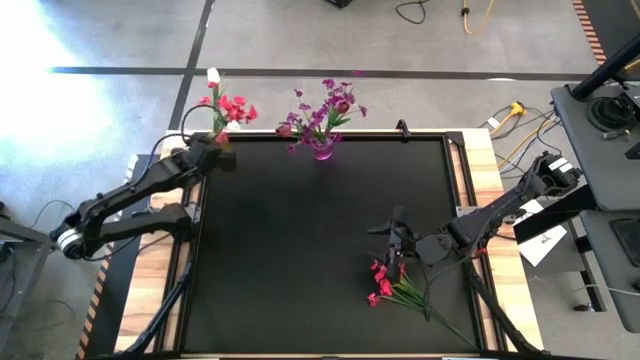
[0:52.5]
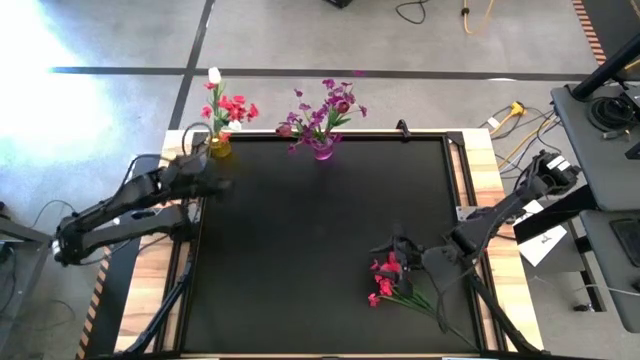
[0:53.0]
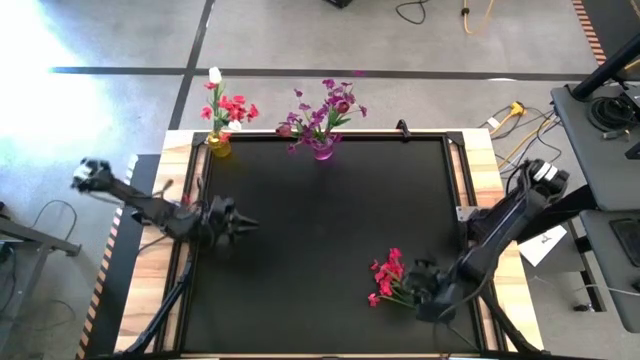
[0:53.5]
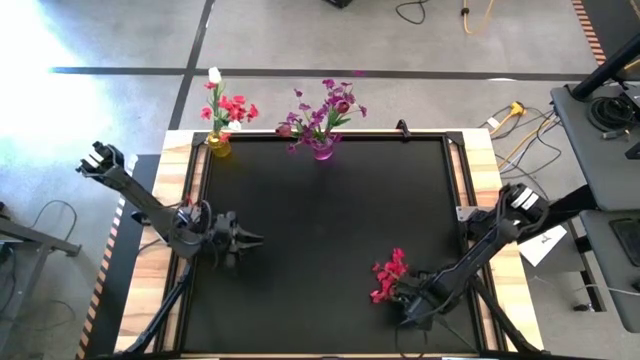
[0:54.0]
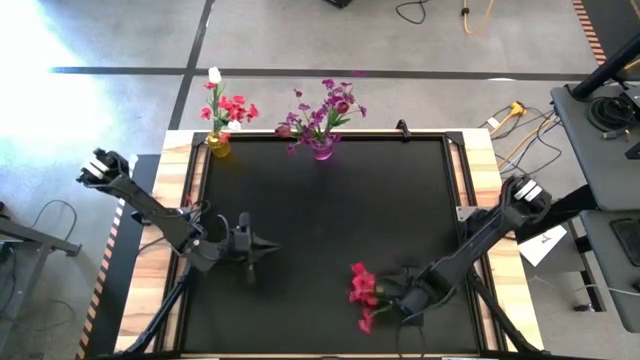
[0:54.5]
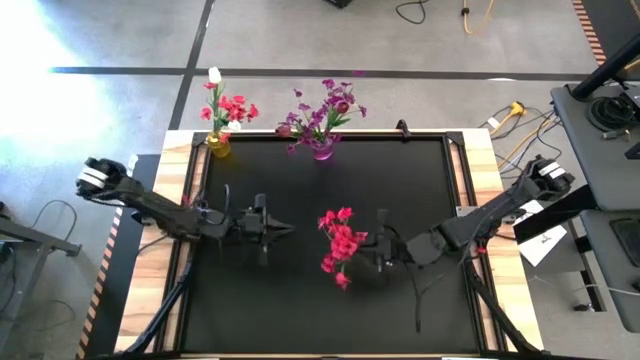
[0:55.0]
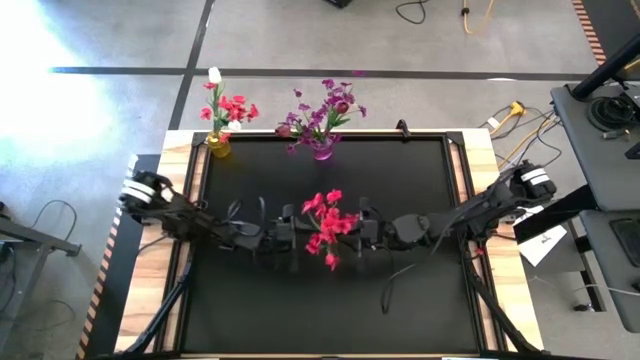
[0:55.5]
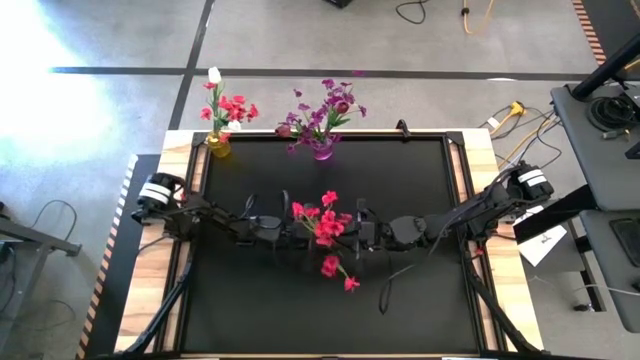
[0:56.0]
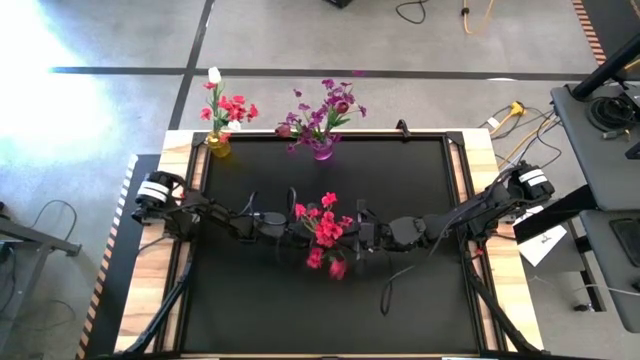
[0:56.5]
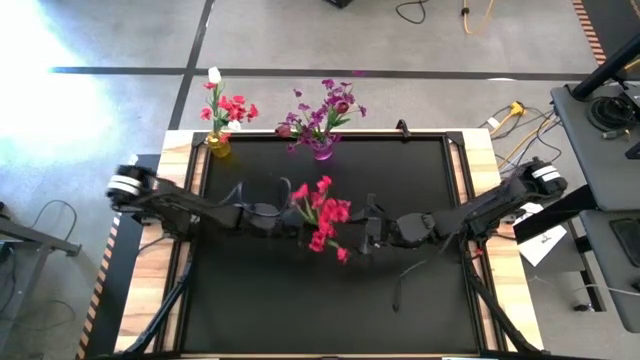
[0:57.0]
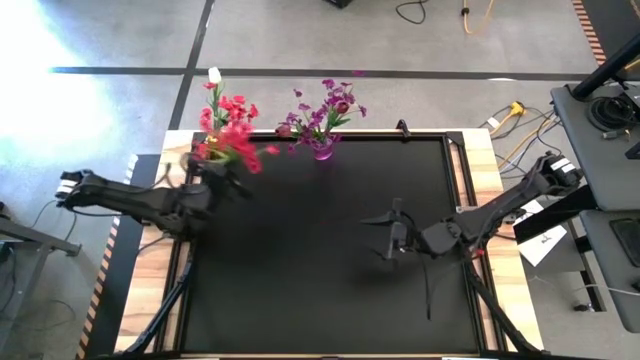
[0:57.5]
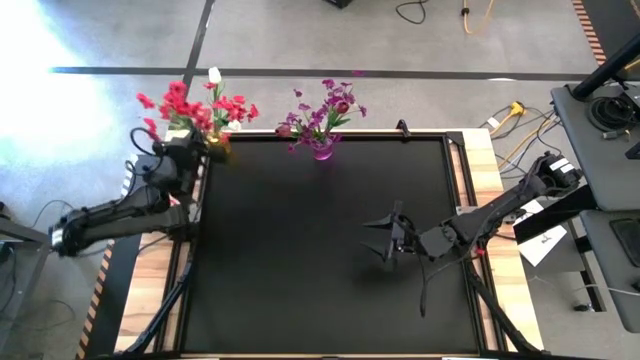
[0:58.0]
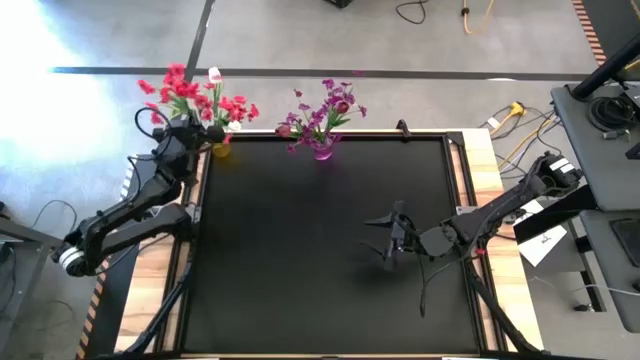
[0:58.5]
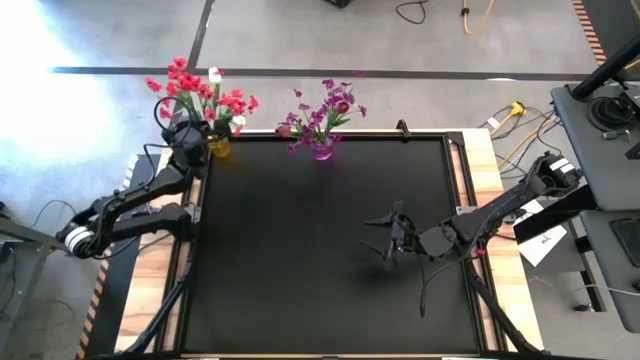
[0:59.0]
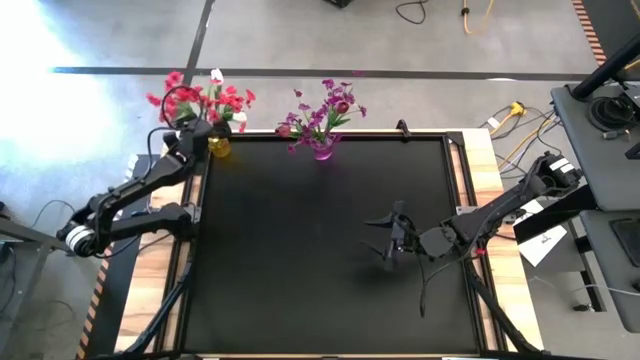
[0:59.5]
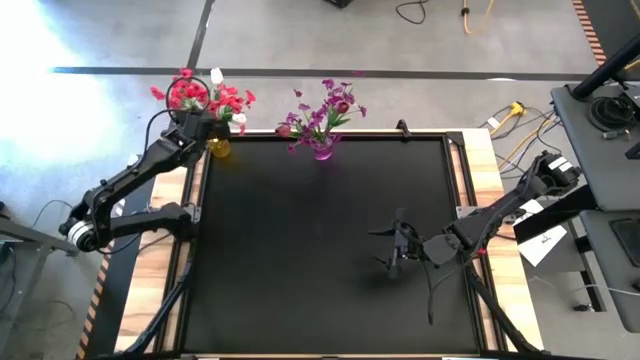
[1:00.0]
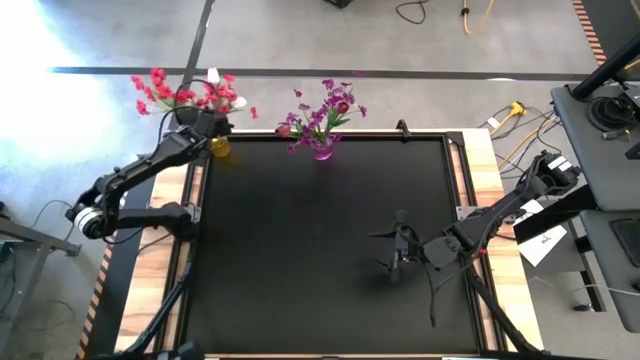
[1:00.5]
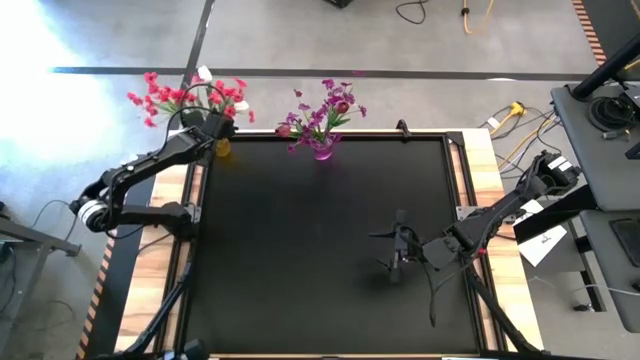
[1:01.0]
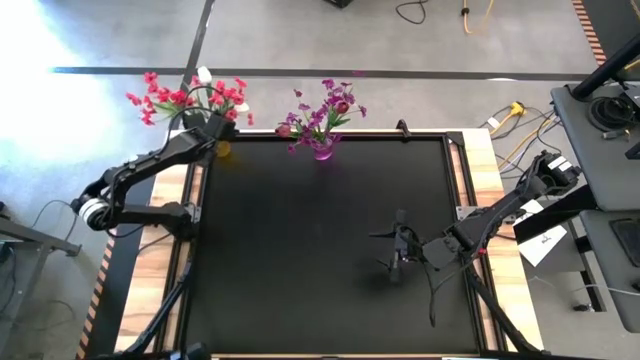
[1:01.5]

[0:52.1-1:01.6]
Task: Sort flowers into vase by color
Put the red flowers into the yellow vase

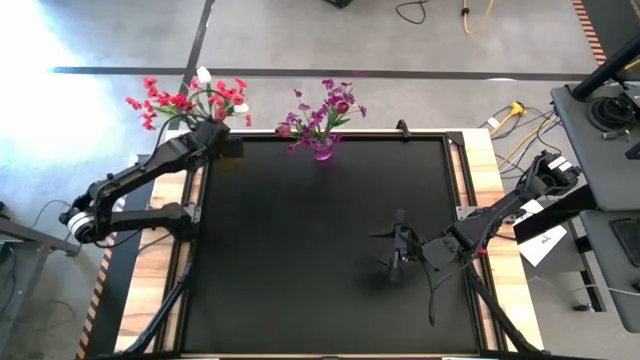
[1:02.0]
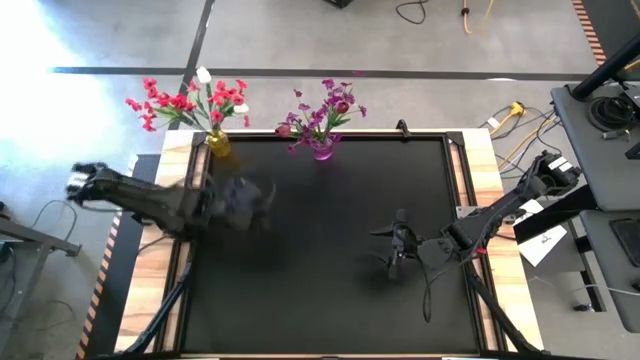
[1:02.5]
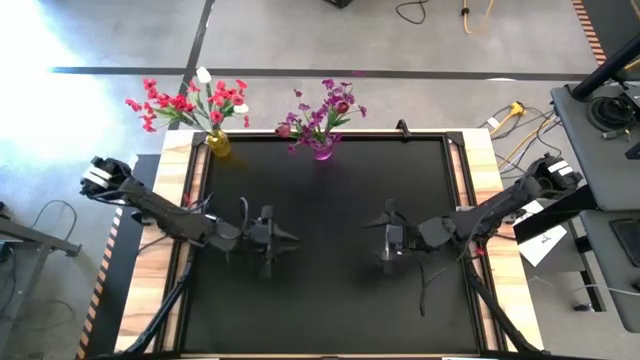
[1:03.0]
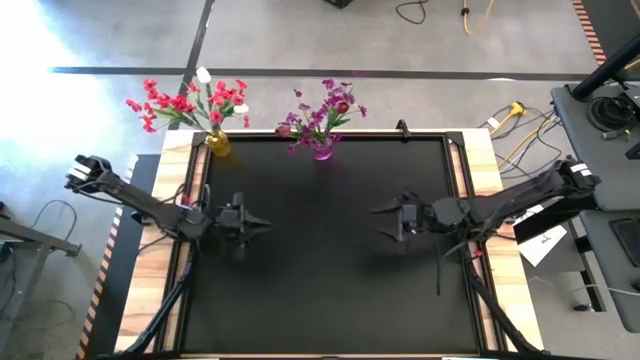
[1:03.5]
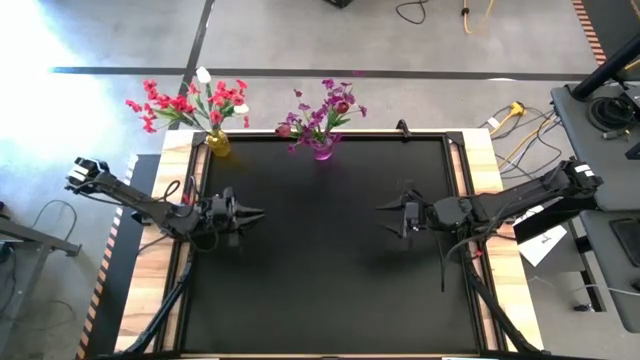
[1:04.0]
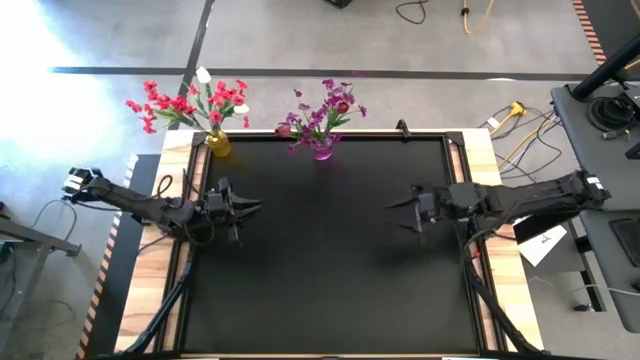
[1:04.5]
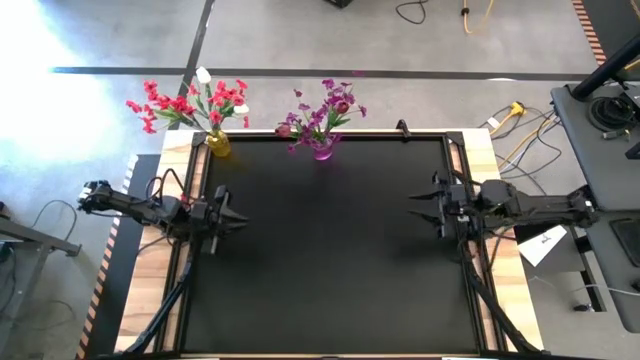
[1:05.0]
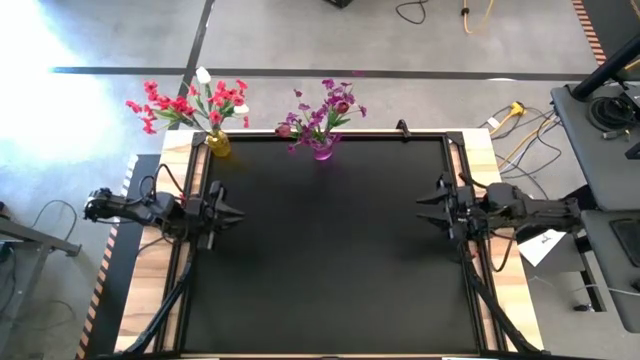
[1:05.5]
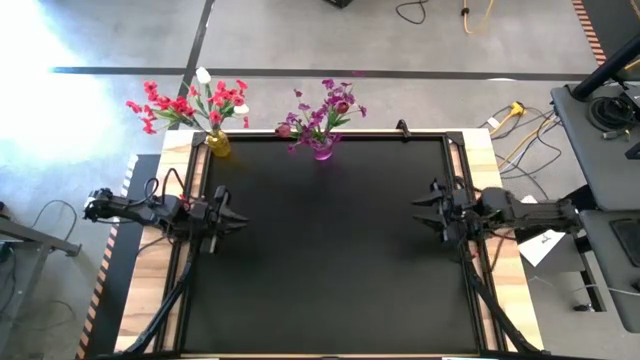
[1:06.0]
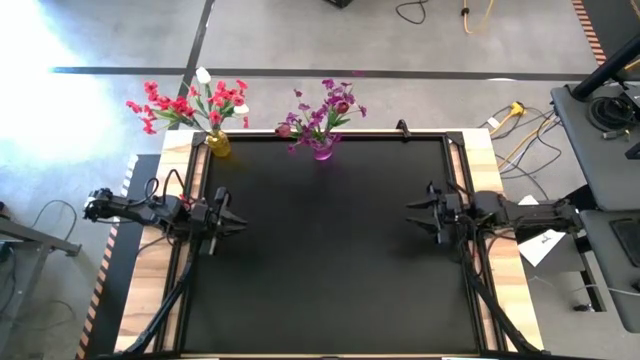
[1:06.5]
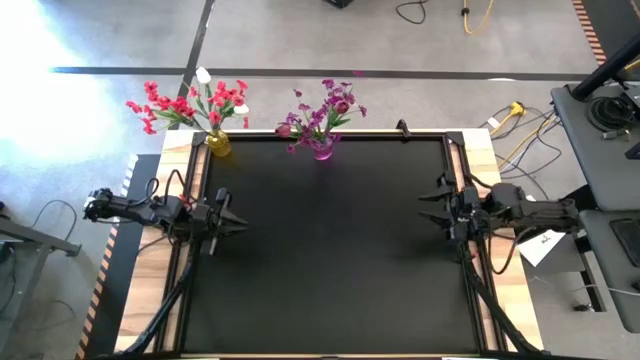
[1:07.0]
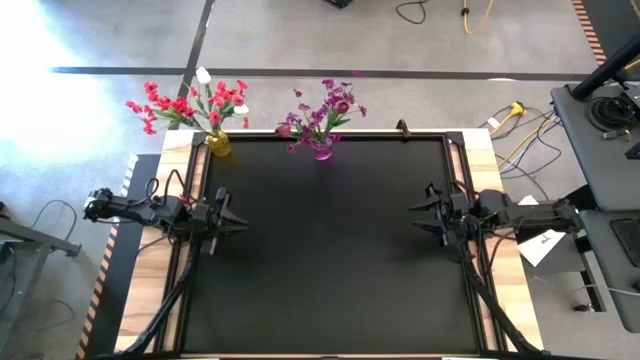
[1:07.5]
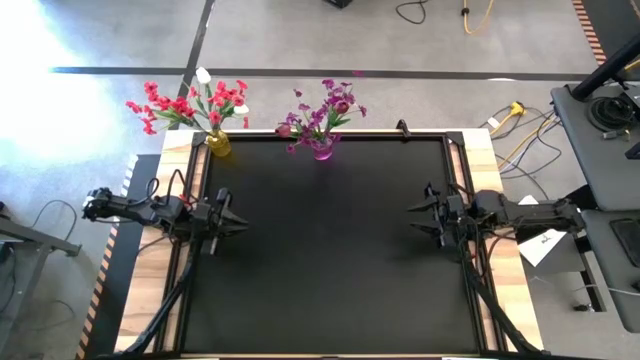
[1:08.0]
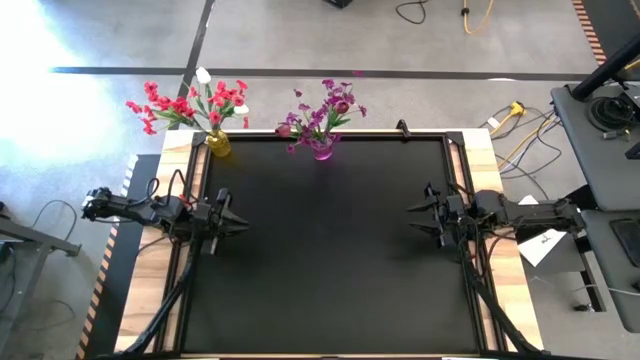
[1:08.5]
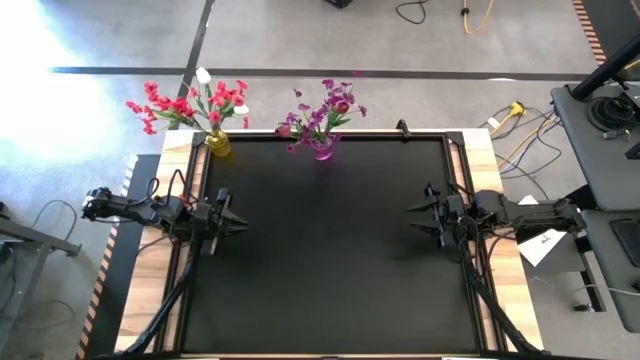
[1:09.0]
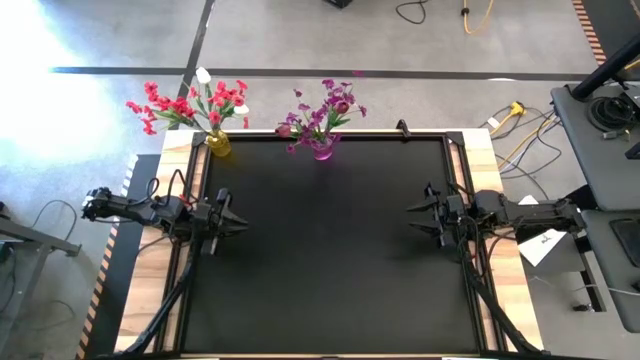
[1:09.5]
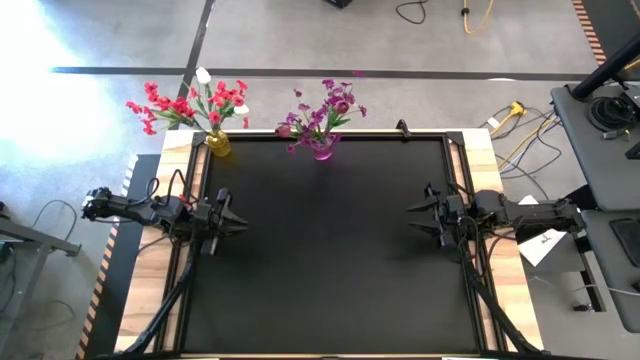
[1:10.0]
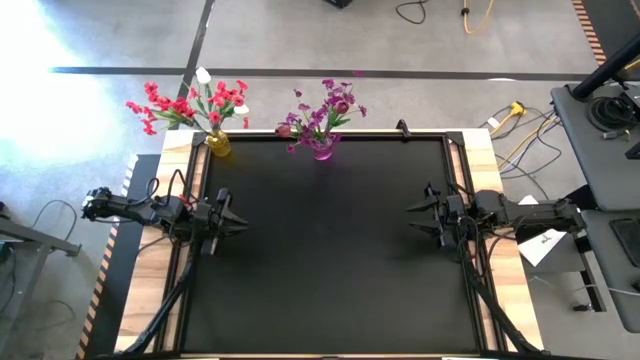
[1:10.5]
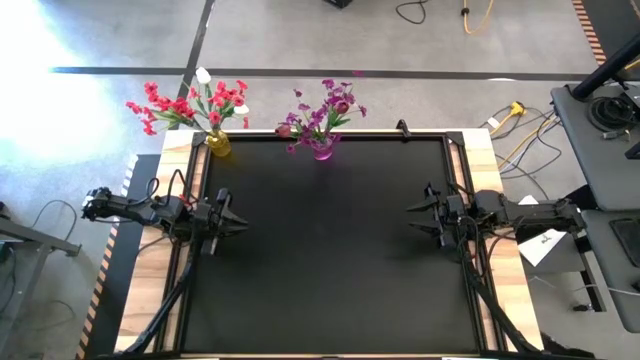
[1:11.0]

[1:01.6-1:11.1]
Return to Home Position

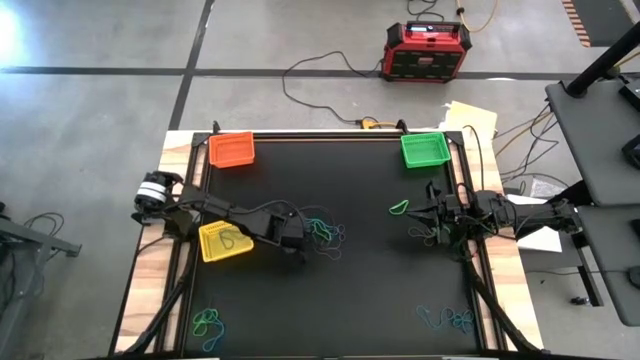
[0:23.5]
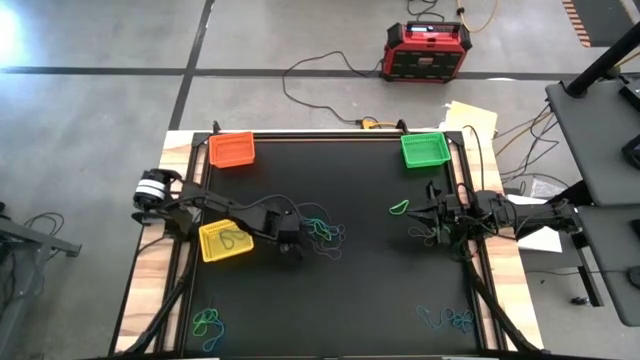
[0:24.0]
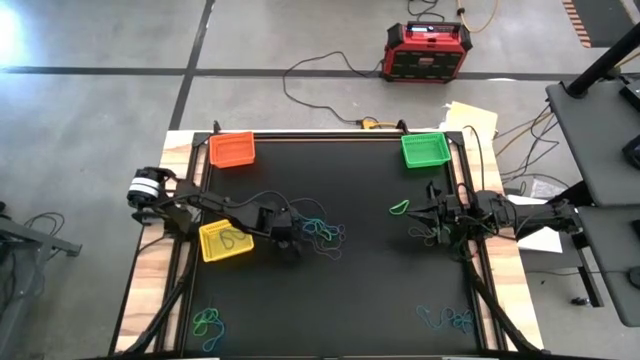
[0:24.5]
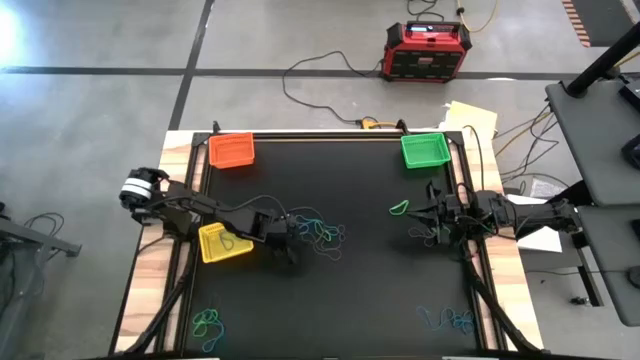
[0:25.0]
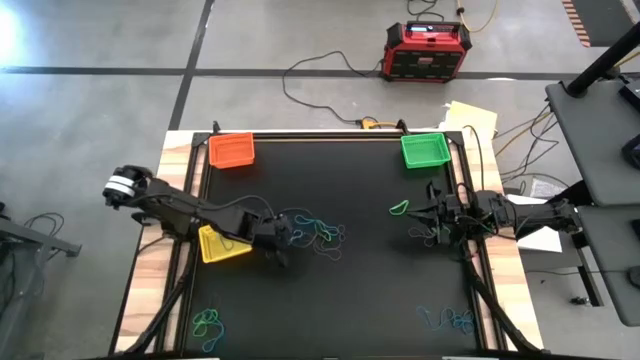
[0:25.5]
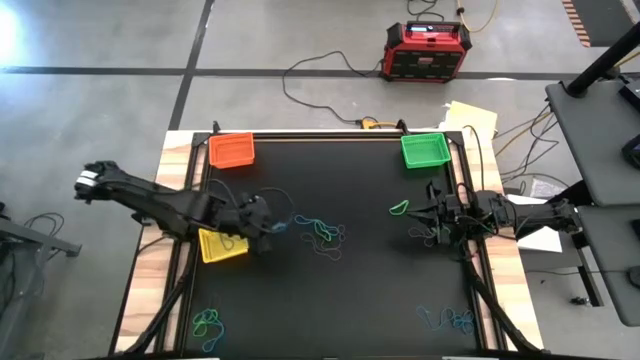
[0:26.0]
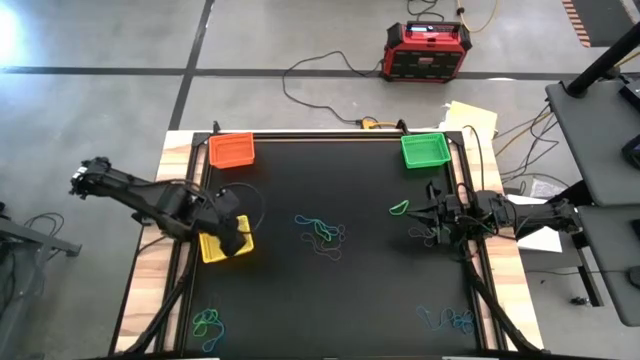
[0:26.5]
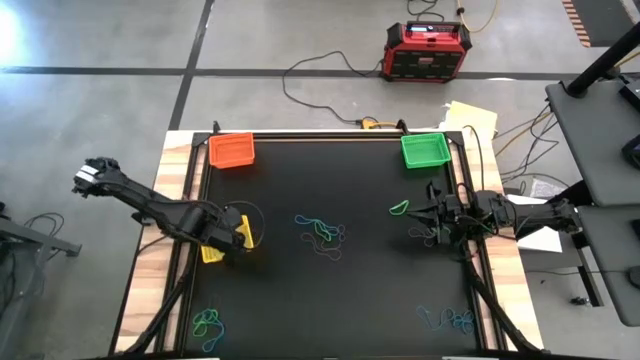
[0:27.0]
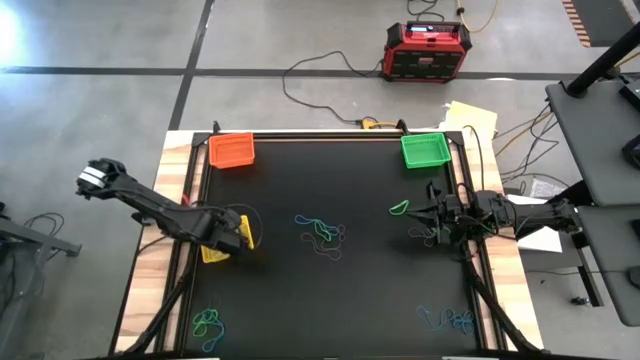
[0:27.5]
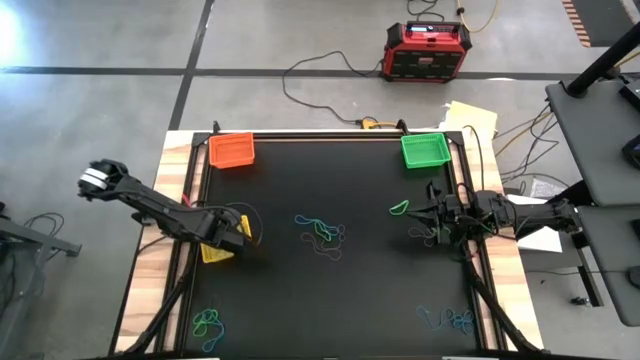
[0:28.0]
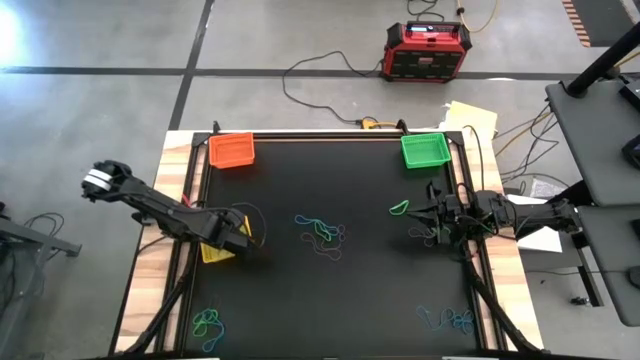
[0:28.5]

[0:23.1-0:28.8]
Task: Sort rubber bands into baskets
Put the blue rubber band into the yellow bin
